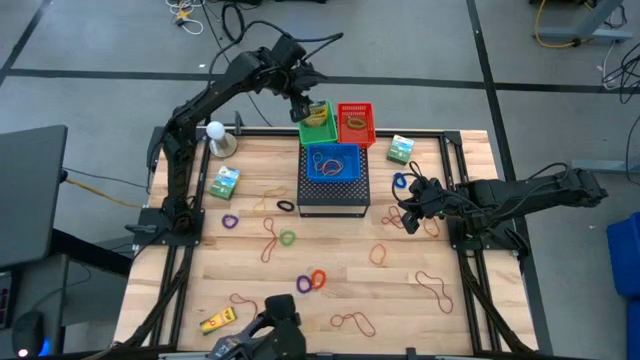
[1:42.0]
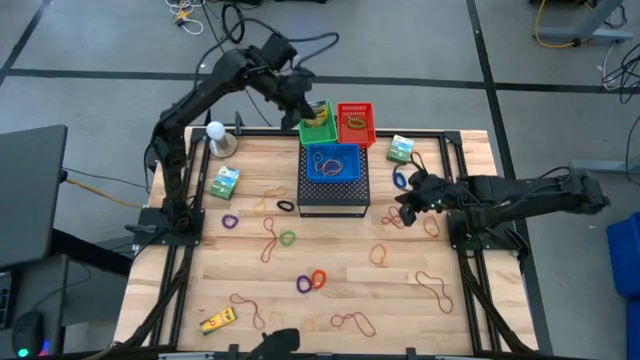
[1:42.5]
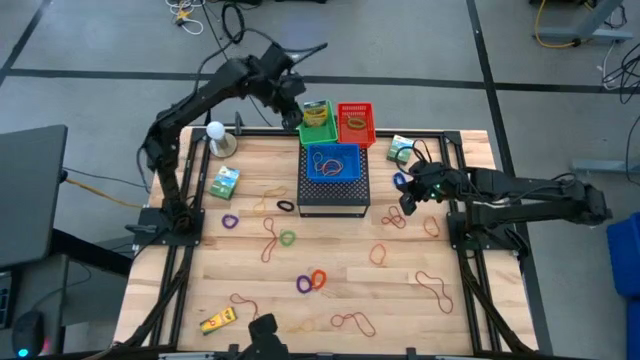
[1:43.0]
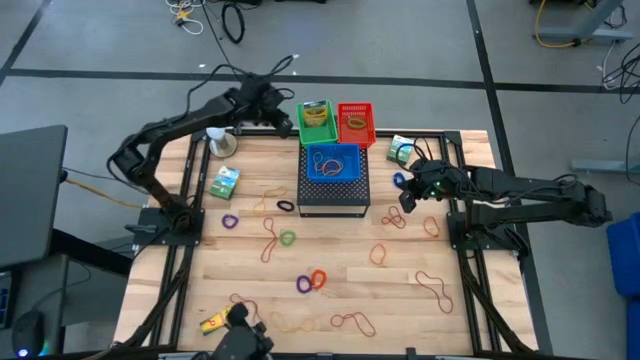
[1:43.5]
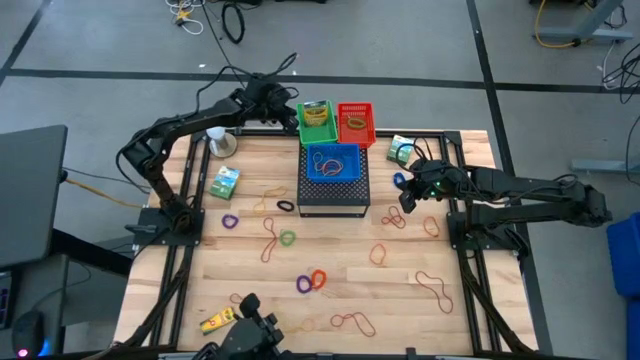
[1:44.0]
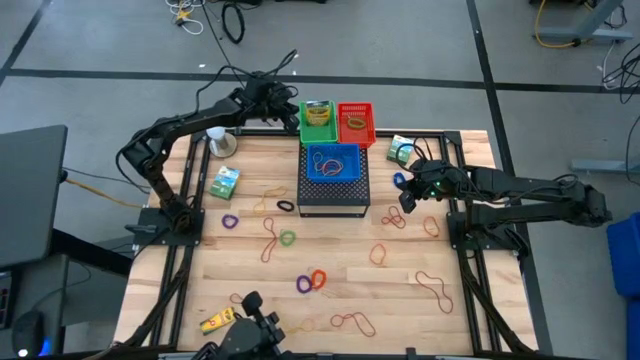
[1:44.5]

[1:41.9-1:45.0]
Task: Pick & Place Office Desk Supplies
Adjust the green bin on the shelf

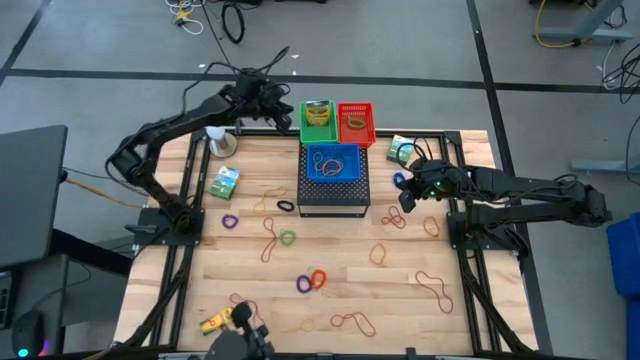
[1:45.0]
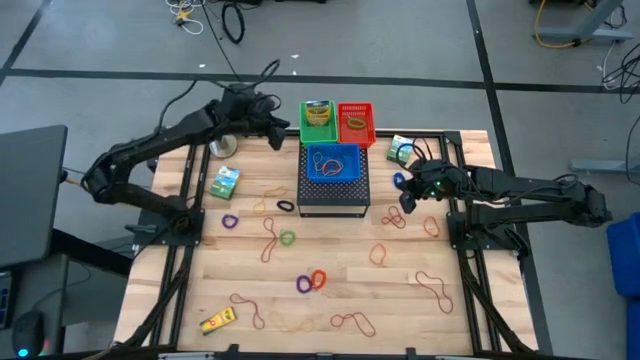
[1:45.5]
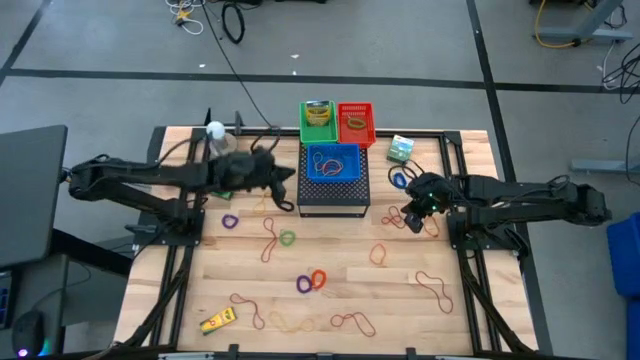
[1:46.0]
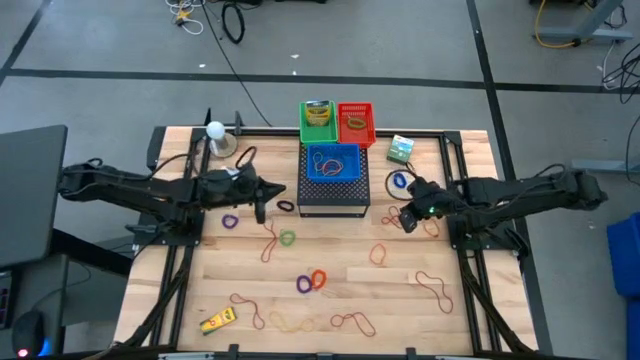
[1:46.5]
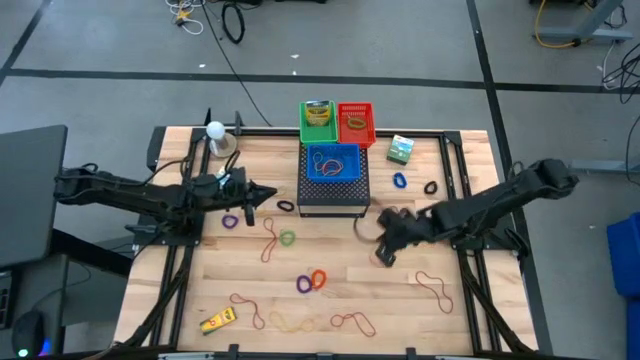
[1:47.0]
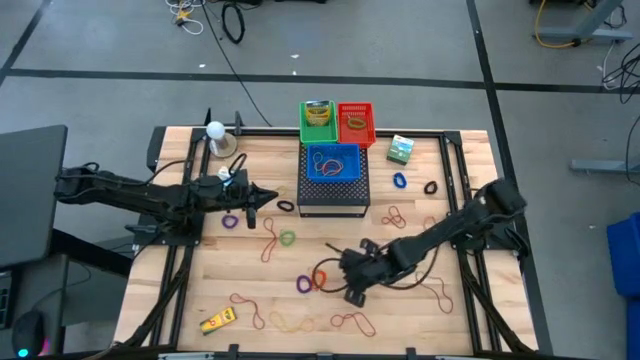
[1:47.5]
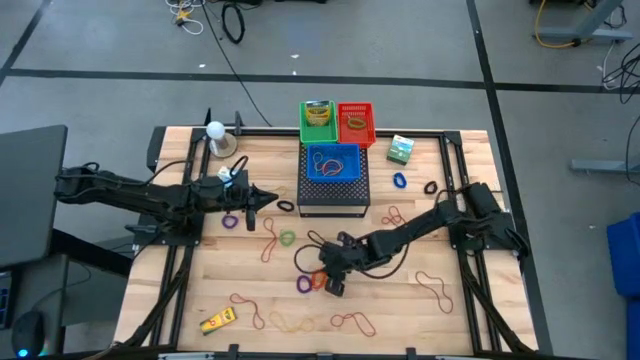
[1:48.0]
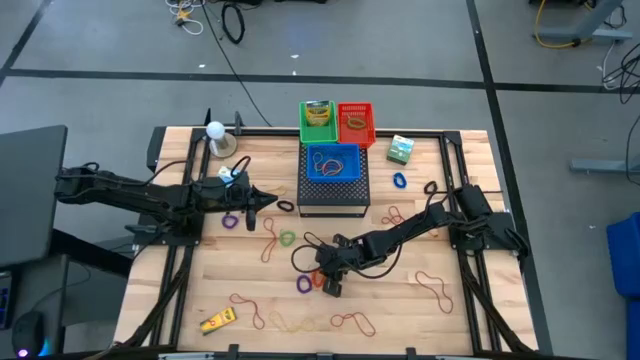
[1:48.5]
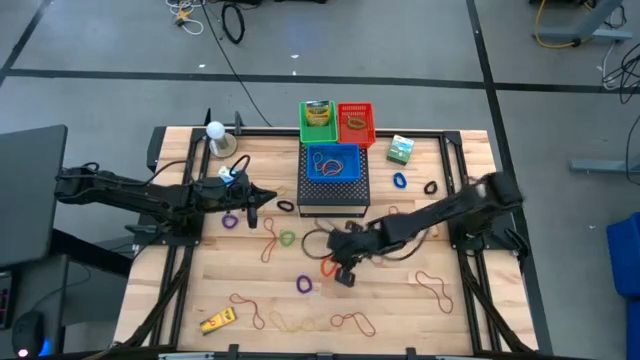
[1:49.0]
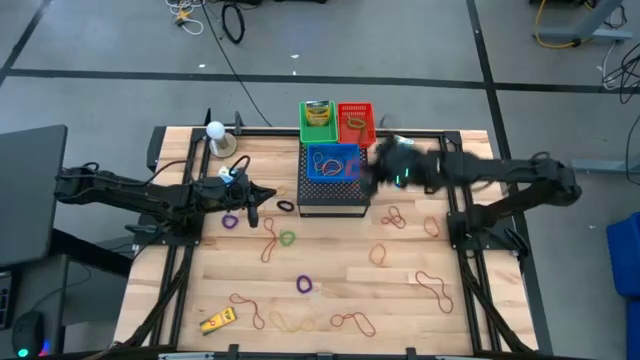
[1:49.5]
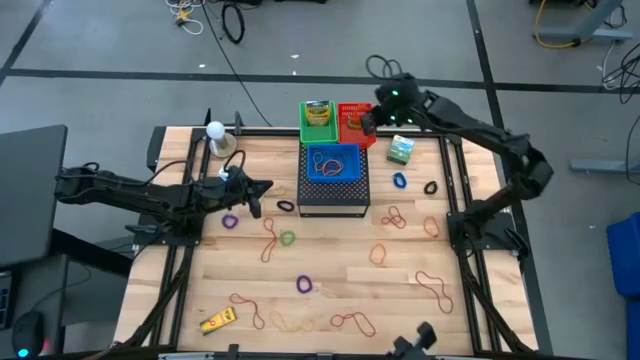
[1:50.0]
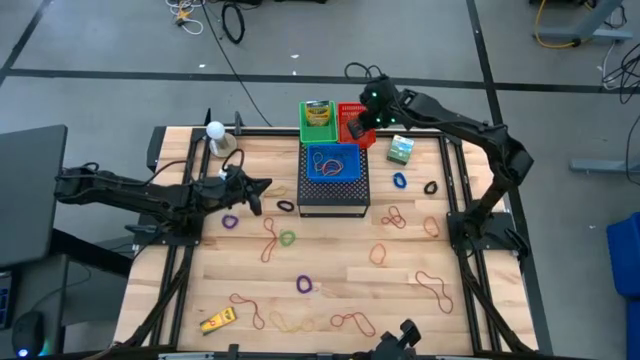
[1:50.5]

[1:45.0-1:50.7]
Put the red spring keychain into the red bin on the shelf

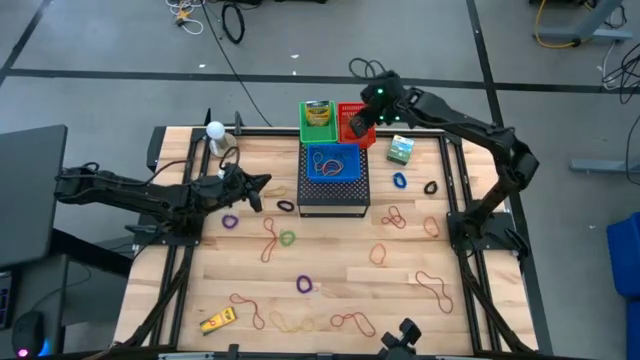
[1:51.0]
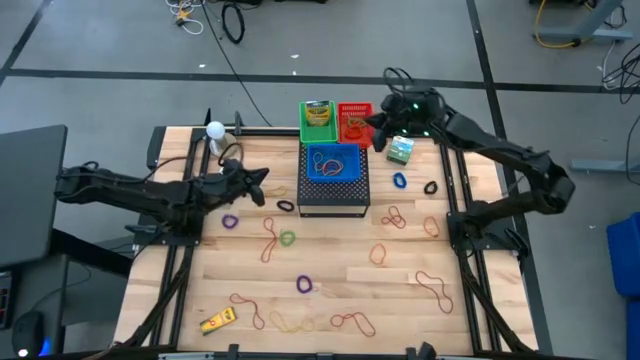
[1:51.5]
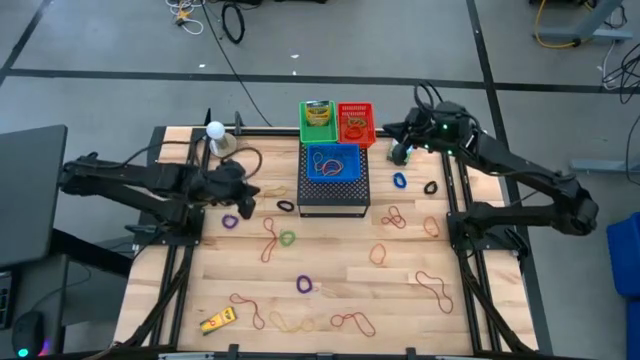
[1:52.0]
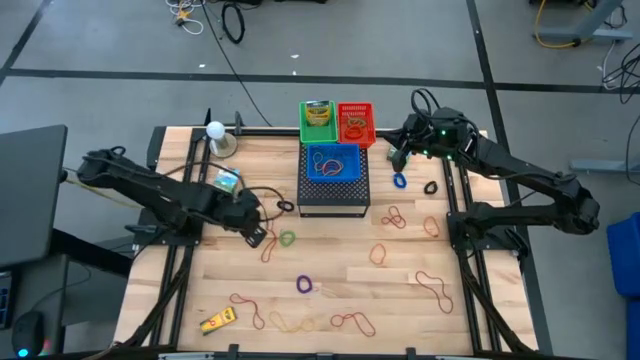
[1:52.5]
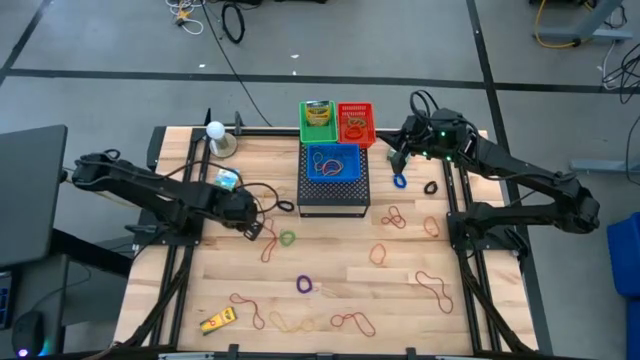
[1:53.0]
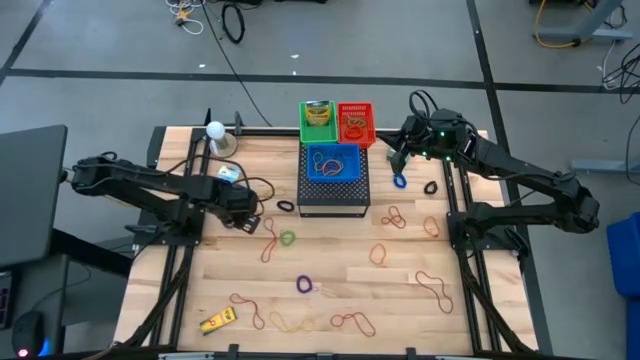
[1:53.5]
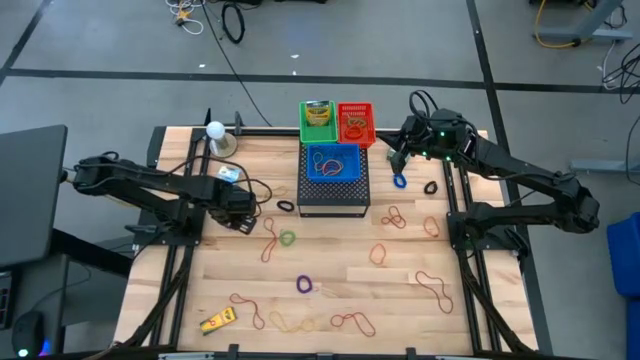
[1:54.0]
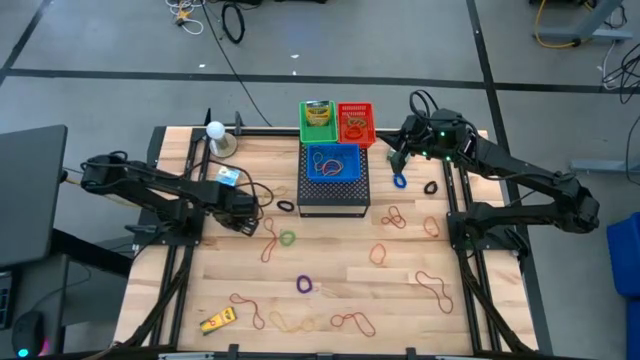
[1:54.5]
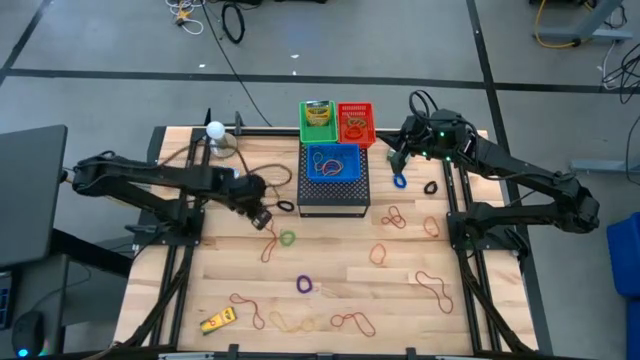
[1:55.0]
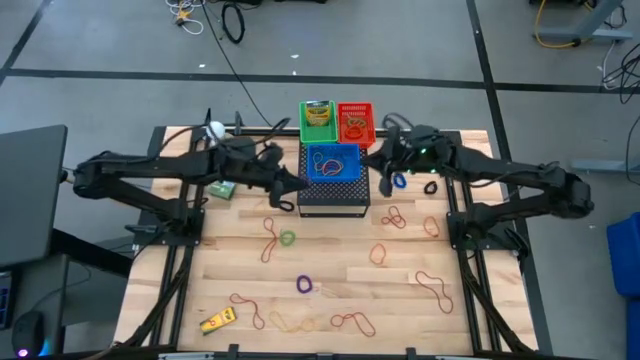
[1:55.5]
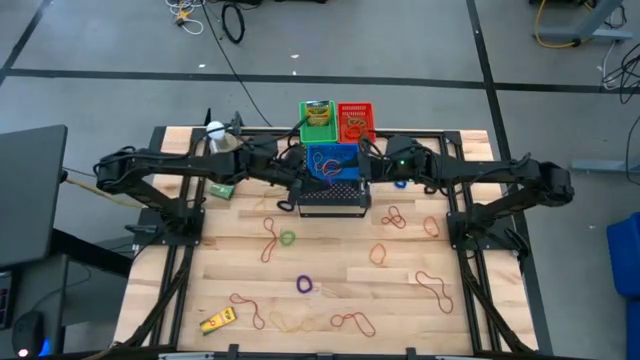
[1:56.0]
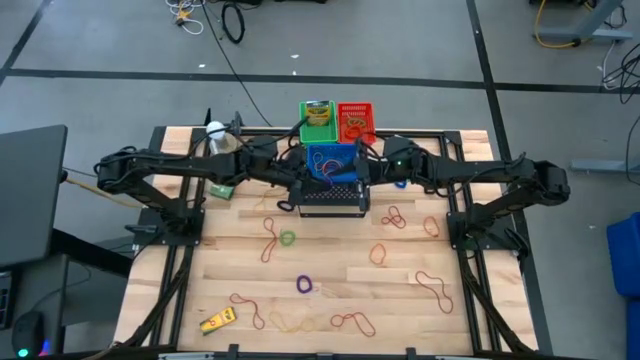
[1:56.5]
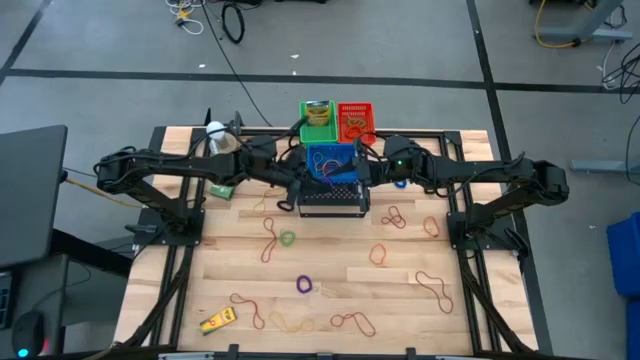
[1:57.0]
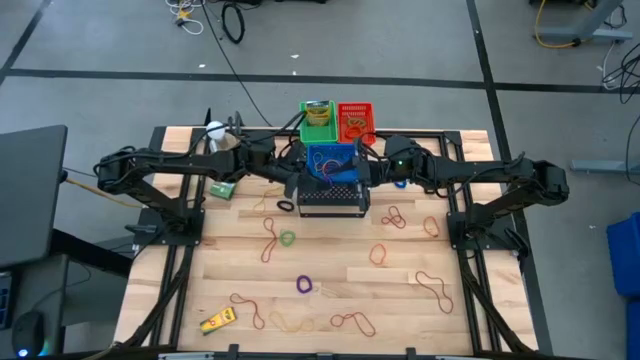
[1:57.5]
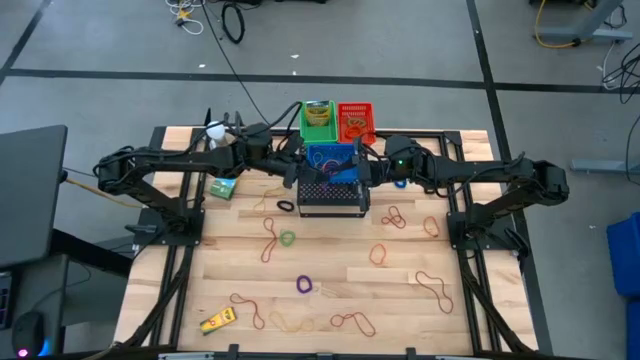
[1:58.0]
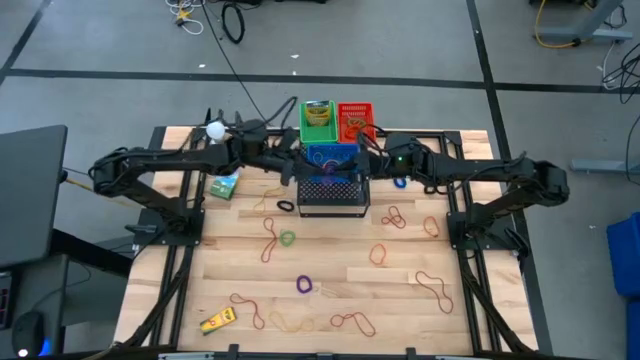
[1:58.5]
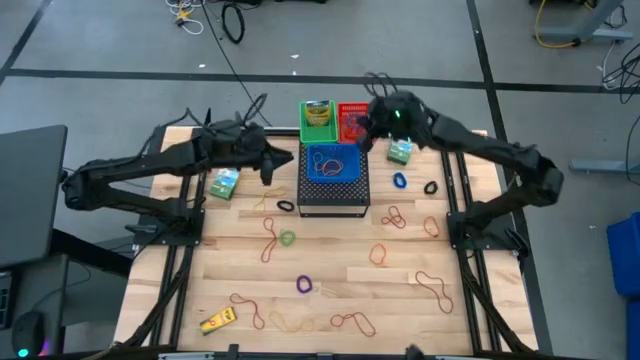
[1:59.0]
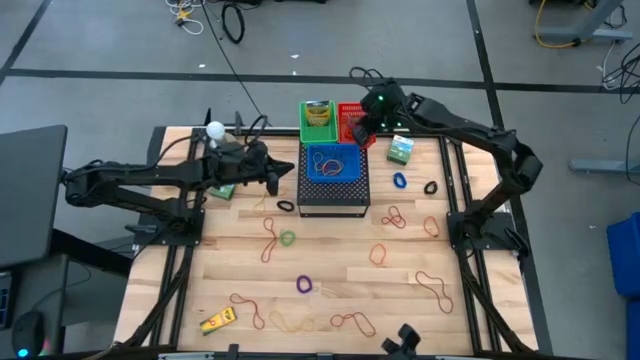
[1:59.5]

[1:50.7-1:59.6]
Put the purple spring keychain into the red bin on the shelf

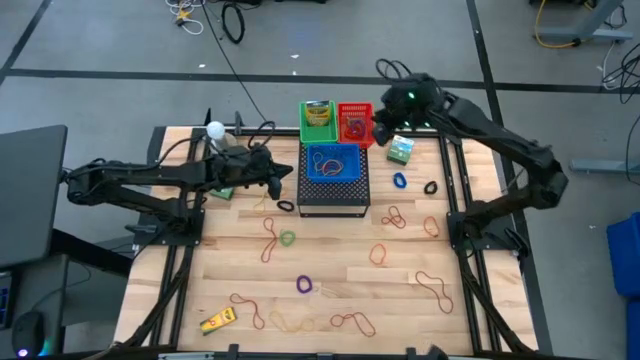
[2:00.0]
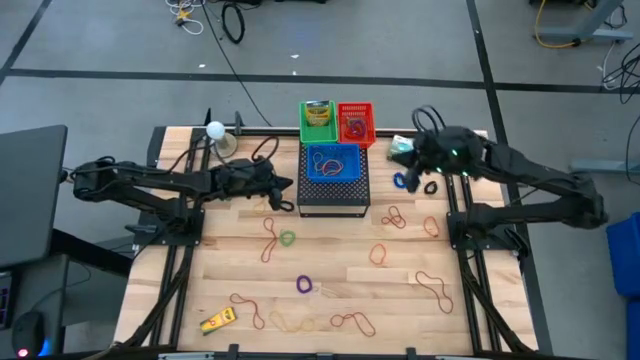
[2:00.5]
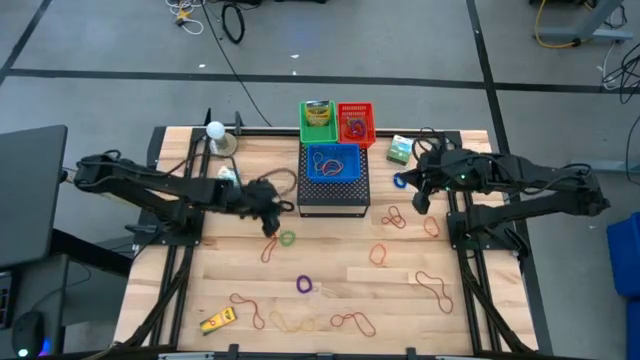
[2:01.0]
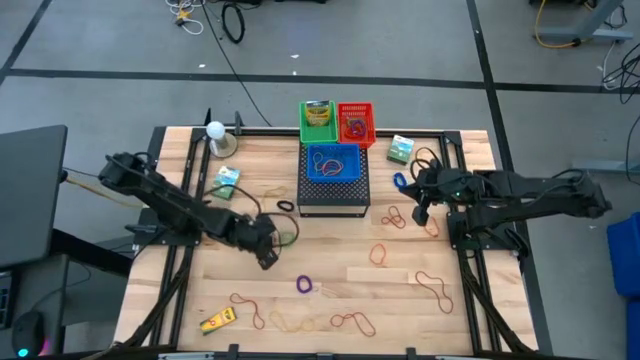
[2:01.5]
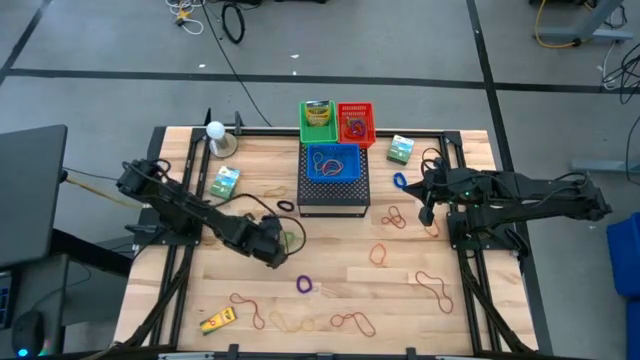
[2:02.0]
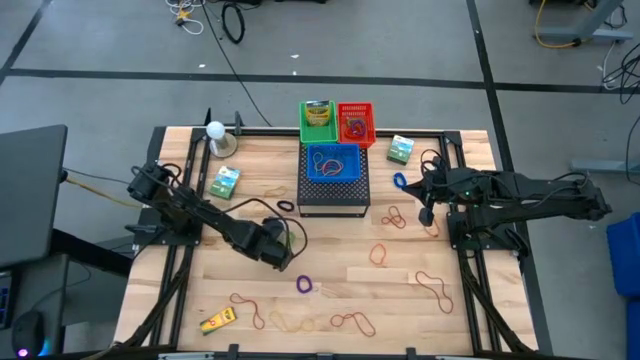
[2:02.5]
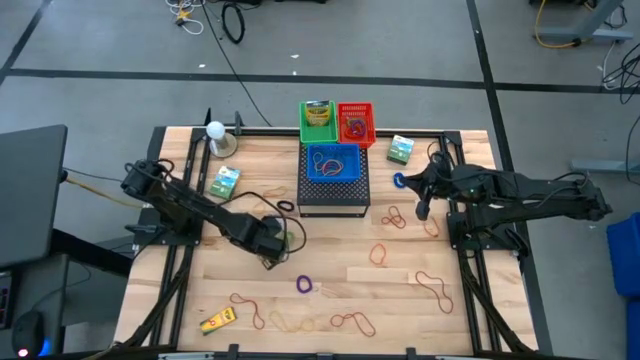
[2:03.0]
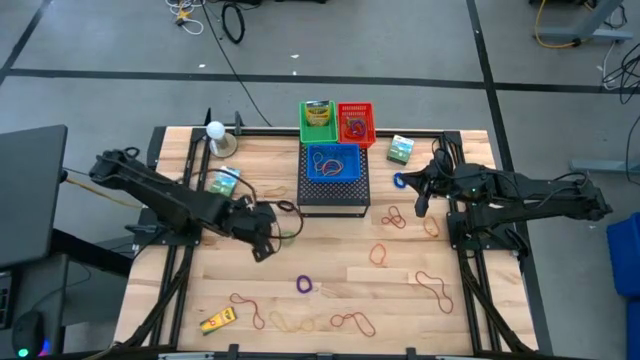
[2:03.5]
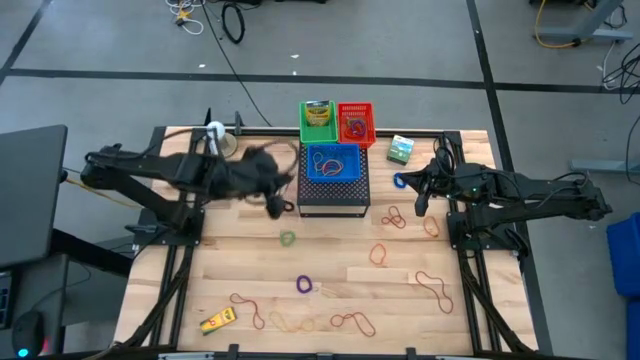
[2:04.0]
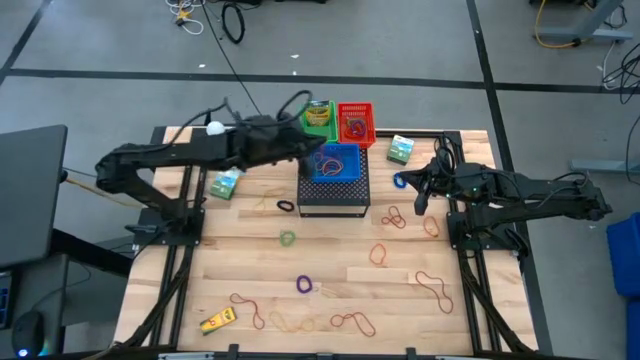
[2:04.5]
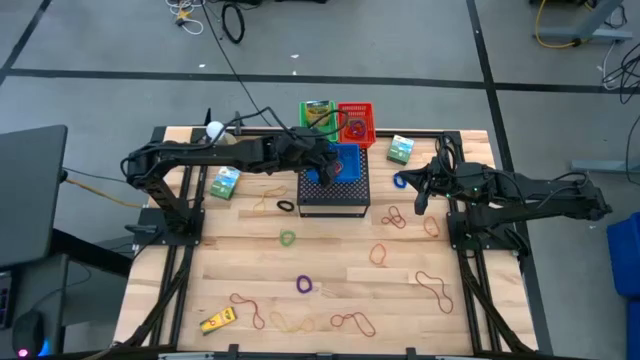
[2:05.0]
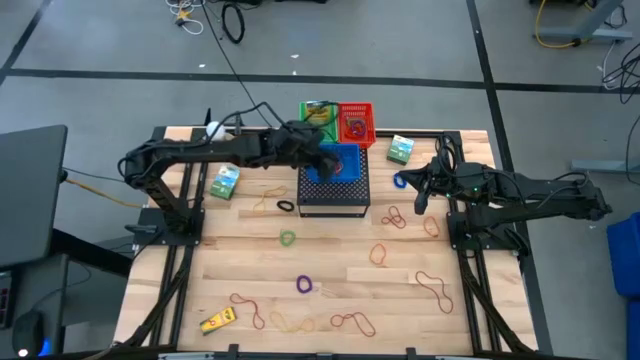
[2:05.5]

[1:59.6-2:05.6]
Put the red rubber band into the blue bin on the shelf
